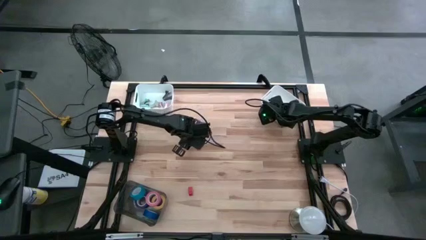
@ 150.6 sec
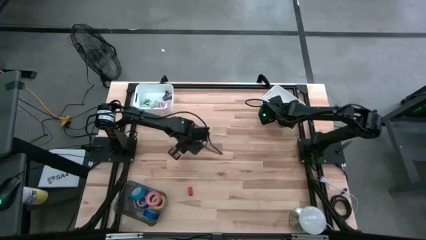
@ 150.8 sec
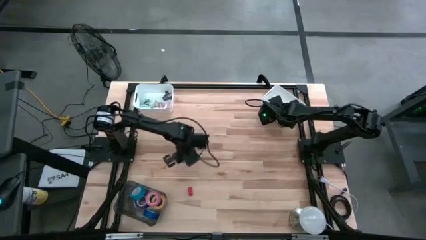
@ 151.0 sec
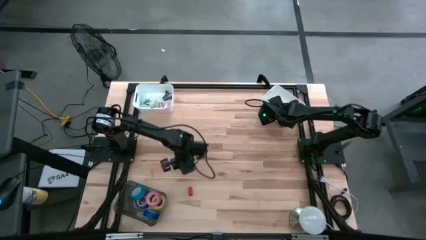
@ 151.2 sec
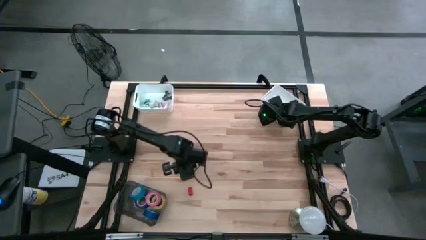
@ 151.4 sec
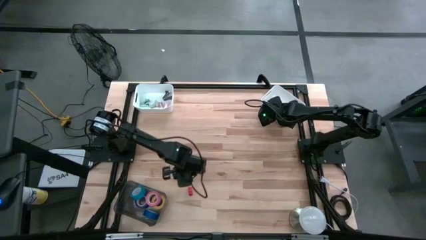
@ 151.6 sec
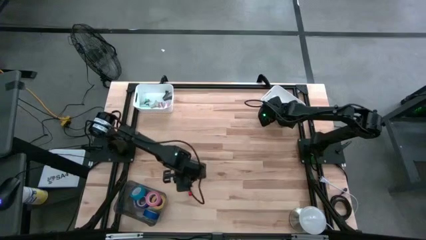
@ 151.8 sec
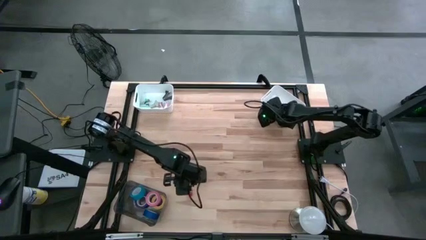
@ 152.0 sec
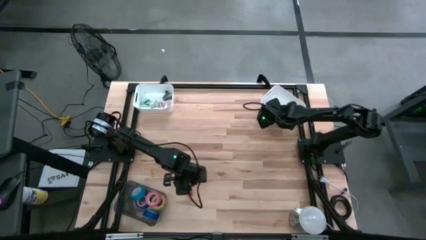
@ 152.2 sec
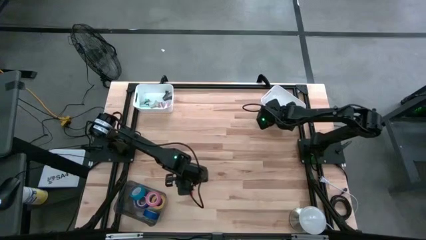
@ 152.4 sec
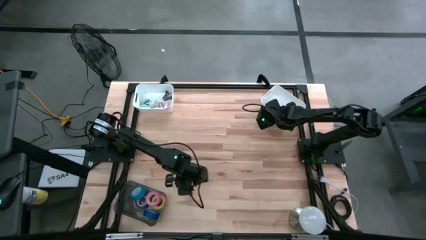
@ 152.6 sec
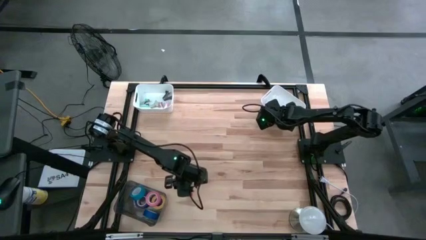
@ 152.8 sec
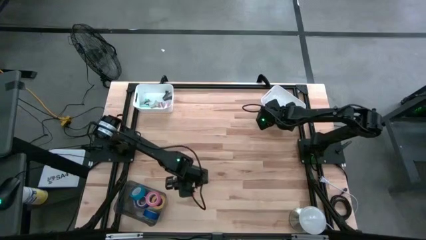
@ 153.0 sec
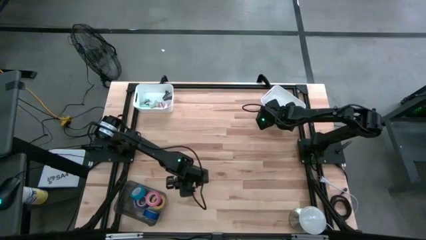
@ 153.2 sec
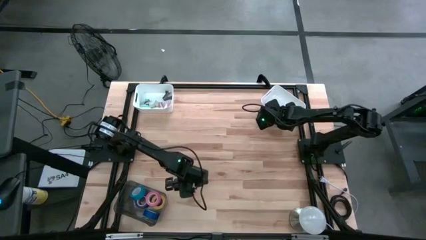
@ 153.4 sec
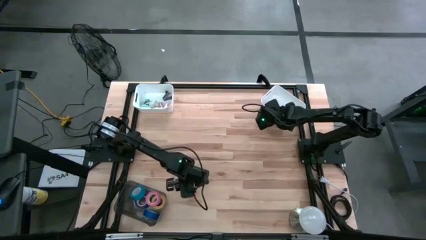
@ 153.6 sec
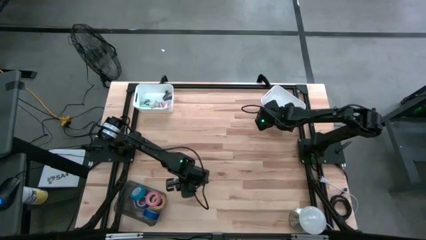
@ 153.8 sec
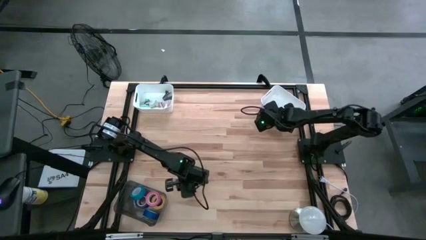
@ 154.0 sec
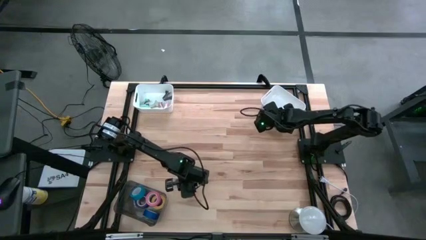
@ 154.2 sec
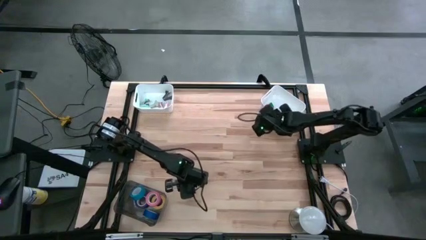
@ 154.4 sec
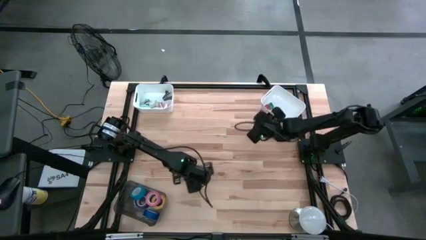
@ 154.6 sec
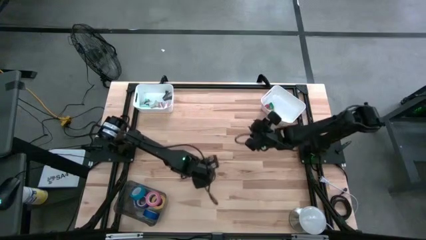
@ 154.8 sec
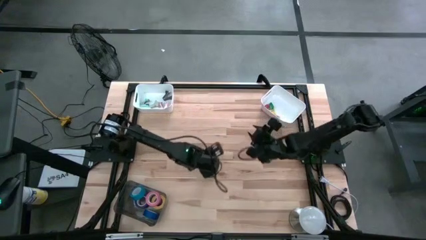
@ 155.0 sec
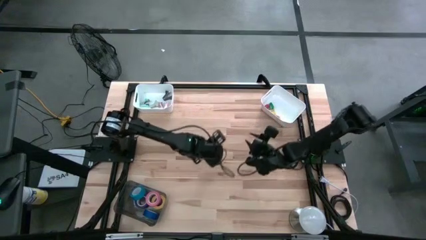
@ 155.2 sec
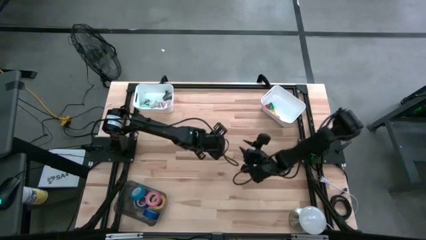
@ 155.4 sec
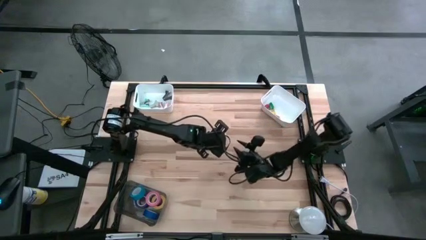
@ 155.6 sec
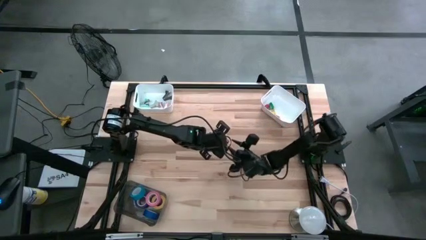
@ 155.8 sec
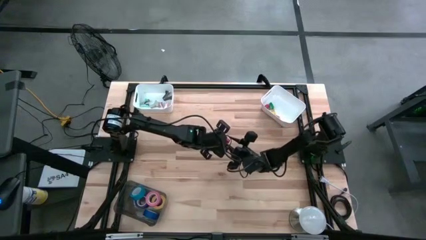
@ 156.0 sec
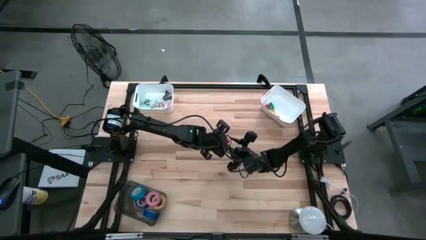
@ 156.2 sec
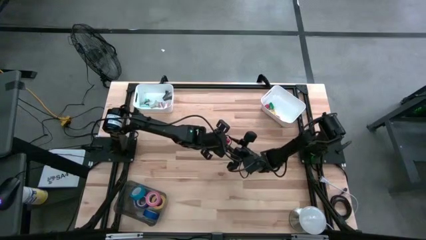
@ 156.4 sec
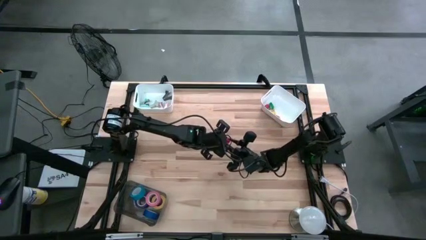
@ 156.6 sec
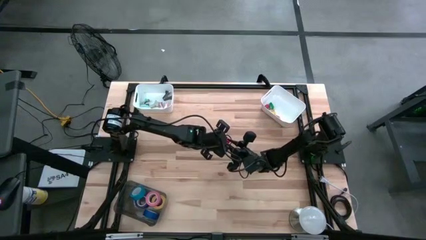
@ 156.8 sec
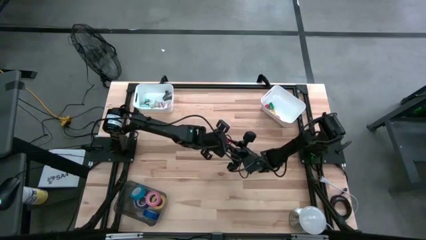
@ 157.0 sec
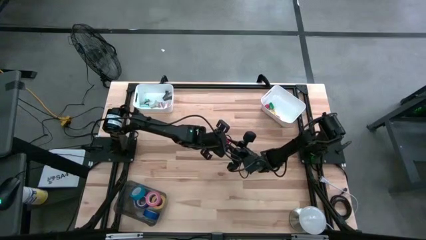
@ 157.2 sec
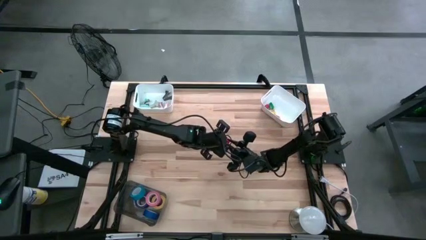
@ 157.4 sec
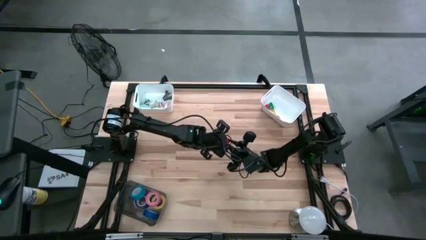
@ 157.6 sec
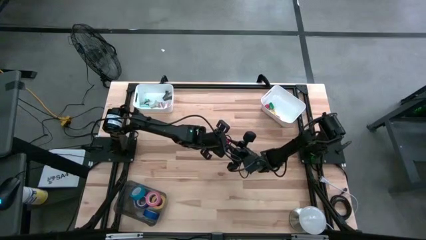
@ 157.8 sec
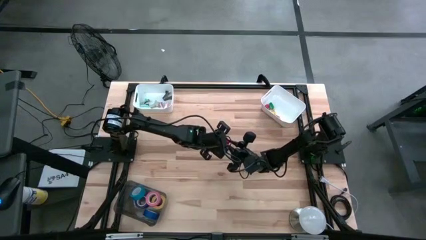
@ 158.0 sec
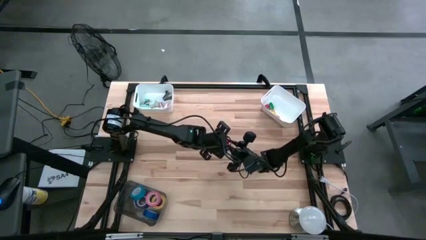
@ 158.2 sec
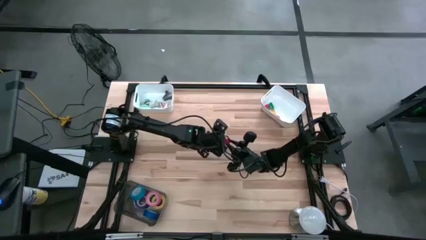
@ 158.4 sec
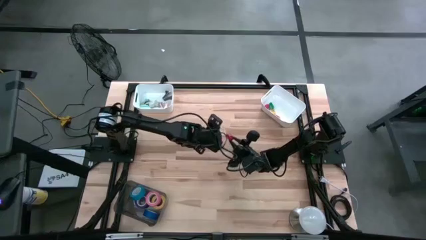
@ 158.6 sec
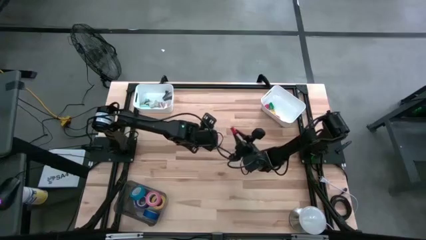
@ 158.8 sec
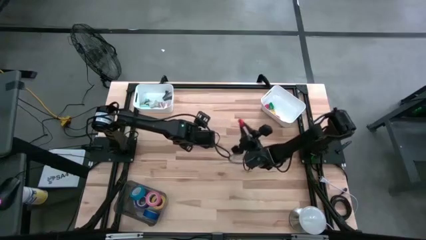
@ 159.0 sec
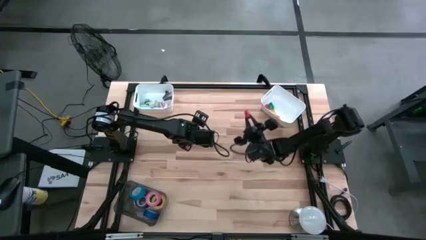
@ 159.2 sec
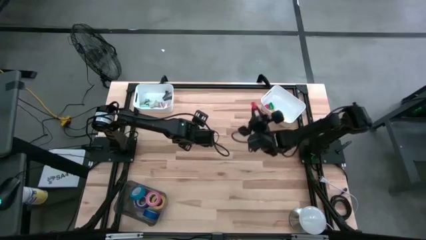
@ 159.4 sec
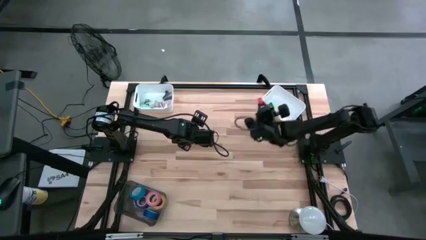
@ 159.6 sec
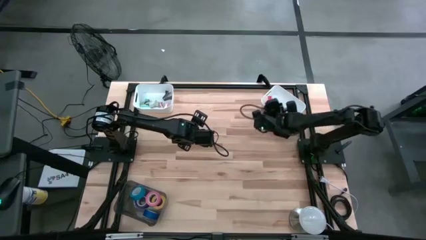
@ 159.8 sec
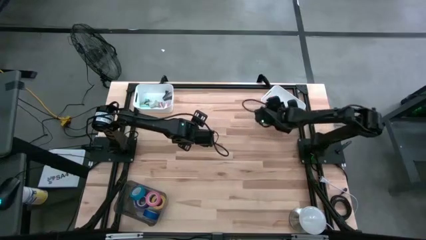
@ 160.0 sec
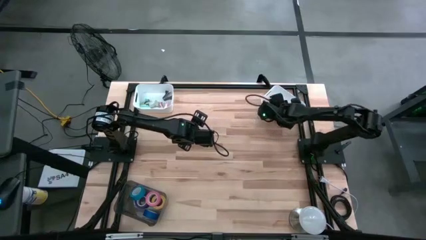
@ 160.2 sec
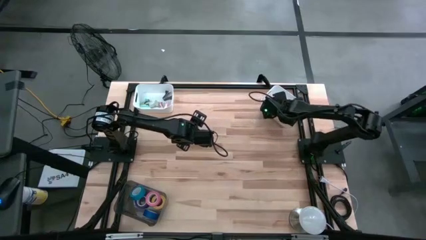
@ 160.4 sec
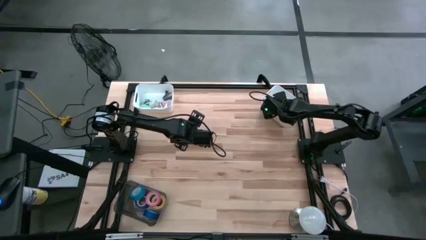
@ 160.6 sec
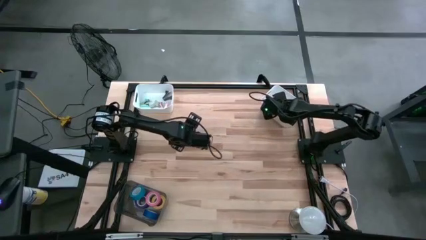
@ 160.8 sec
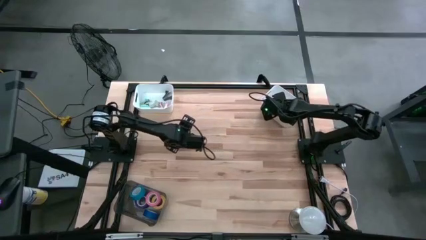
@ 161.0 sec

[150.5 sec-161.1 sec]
Task: Pick and place Stapler, Stapler remover, tape
Put the red stapler into the right white bin

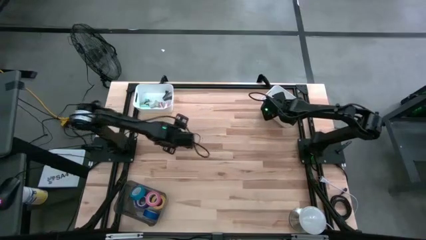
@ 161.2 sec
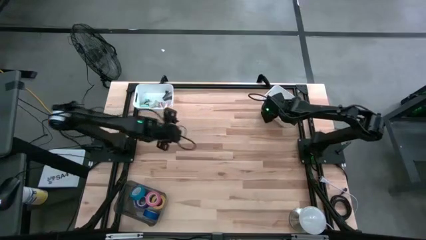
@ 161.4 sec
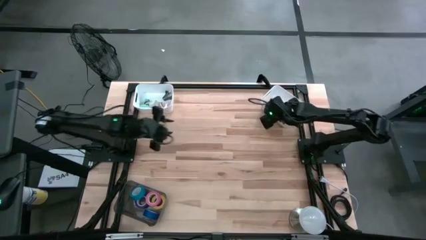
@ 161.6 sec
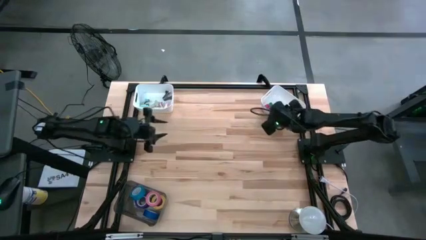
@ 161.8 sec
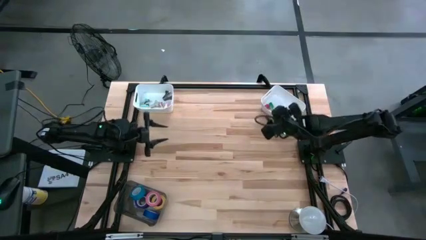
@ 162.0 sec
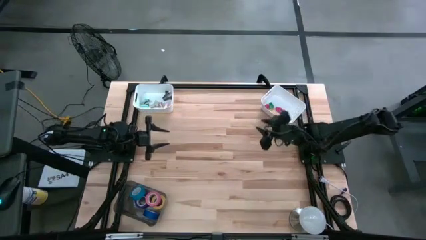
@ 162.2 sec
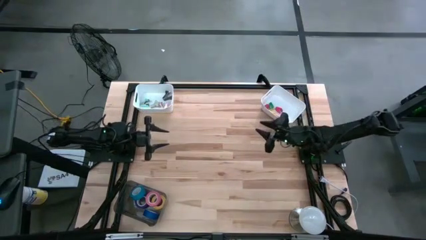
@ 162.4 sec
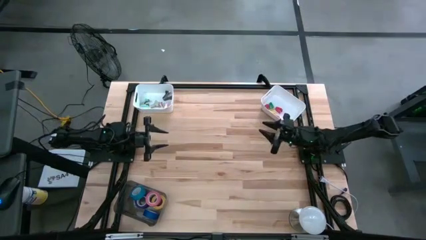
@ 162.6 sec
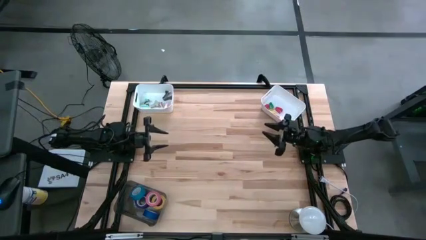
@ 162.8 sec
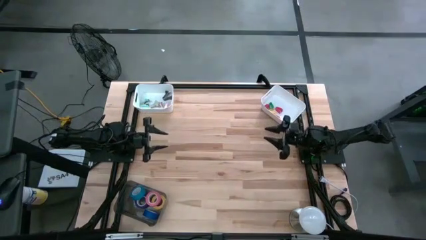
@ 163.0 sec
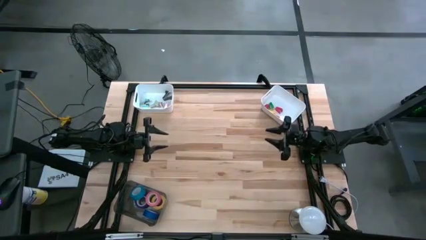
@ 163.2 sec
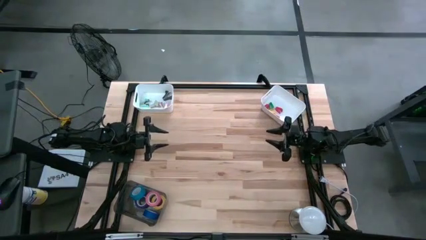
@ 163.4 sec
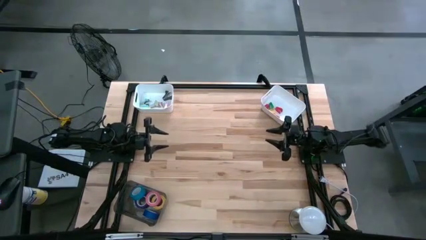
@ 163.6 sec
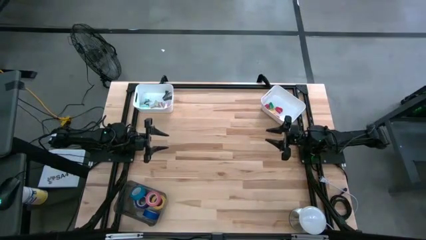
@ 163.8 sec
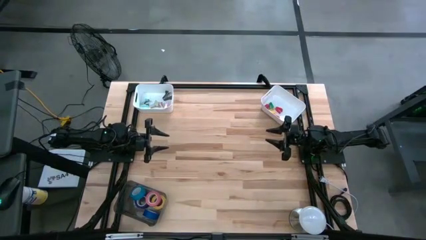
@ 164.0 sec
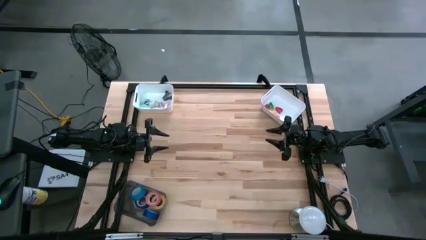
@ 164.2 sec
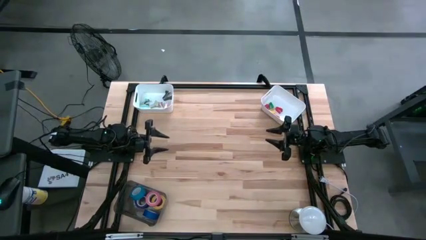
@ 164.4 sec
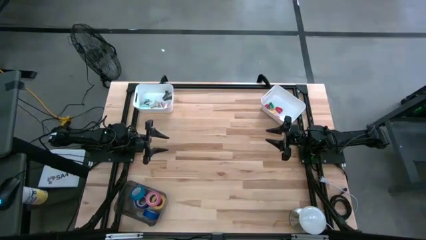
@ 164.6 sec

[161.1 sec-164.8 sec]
Return to Home Position
